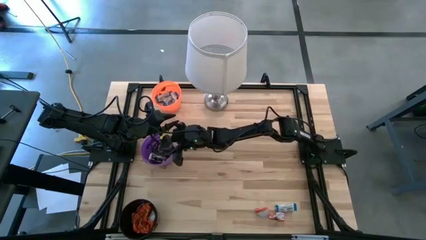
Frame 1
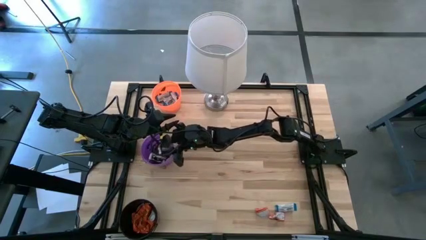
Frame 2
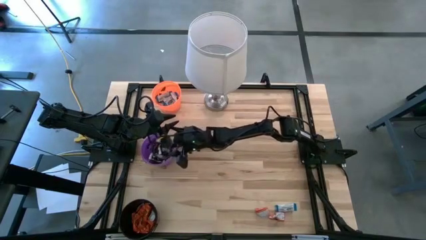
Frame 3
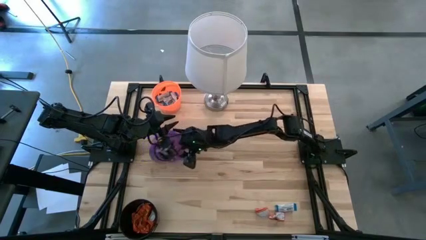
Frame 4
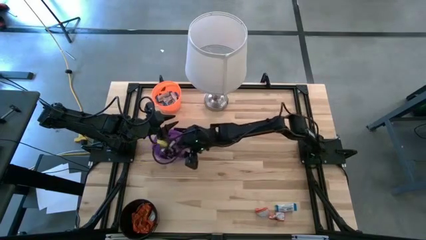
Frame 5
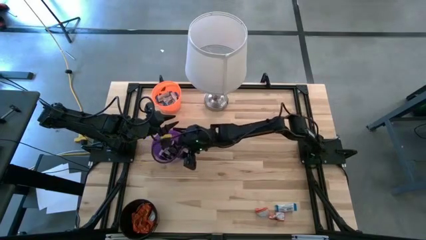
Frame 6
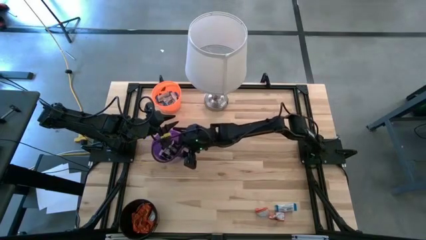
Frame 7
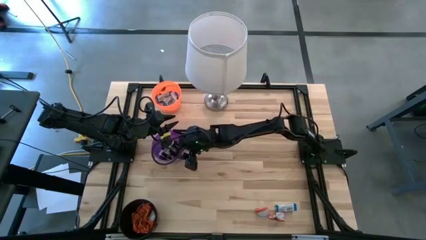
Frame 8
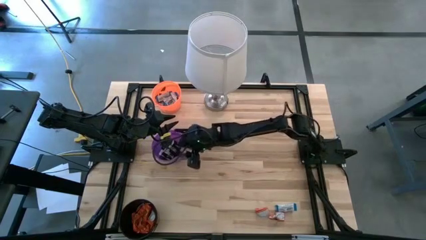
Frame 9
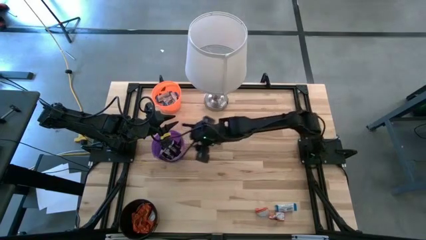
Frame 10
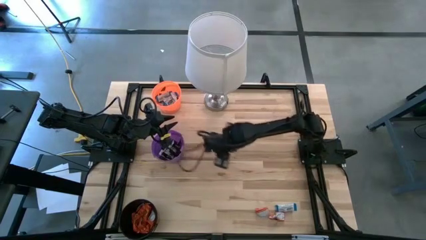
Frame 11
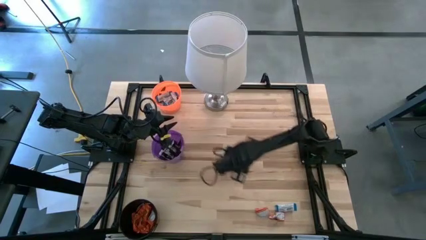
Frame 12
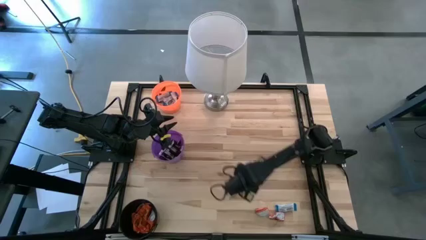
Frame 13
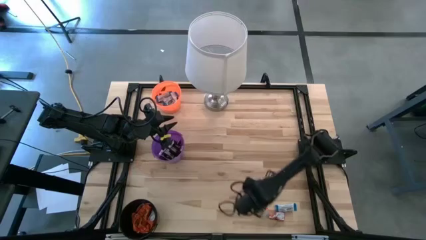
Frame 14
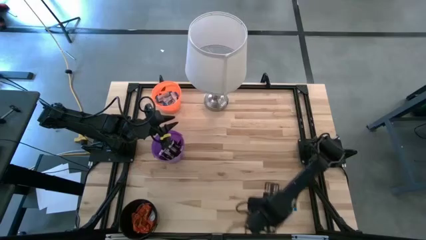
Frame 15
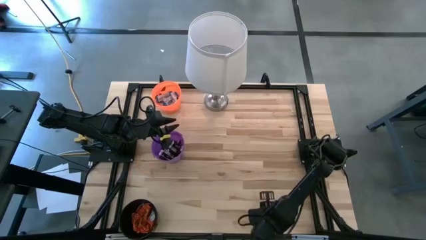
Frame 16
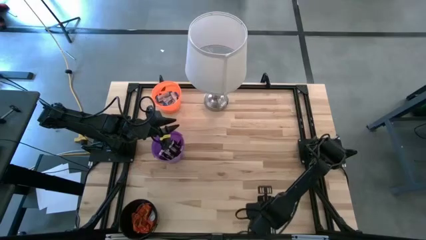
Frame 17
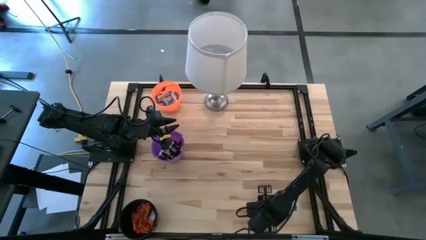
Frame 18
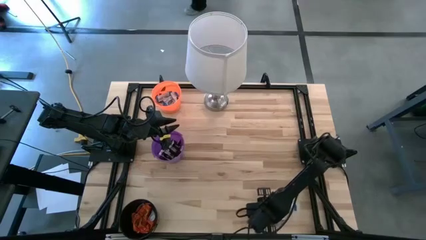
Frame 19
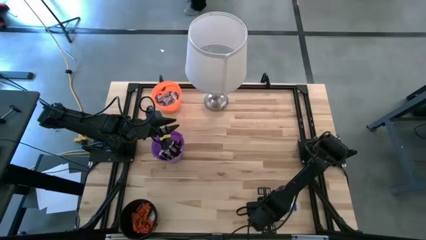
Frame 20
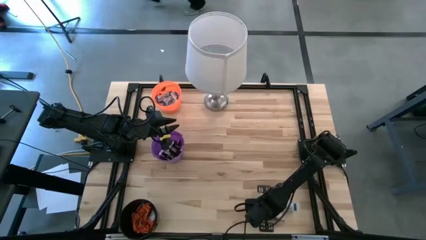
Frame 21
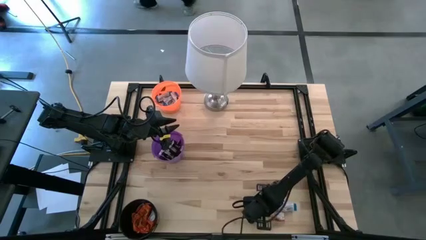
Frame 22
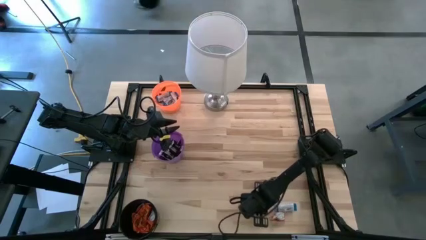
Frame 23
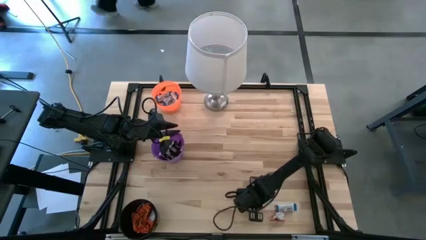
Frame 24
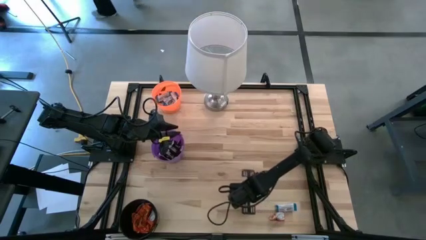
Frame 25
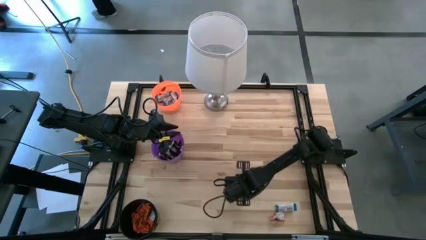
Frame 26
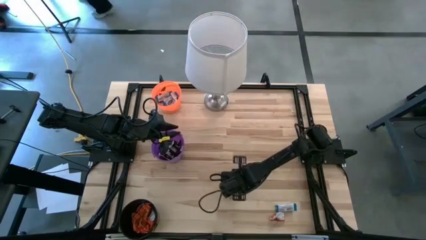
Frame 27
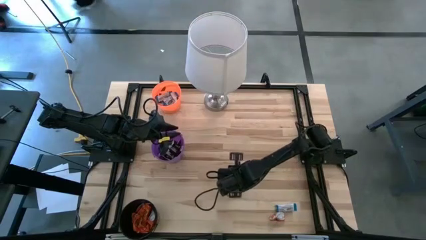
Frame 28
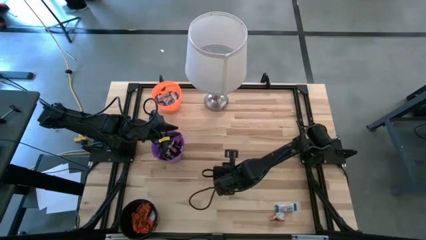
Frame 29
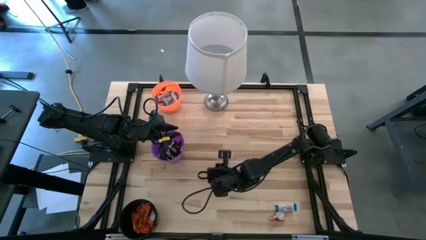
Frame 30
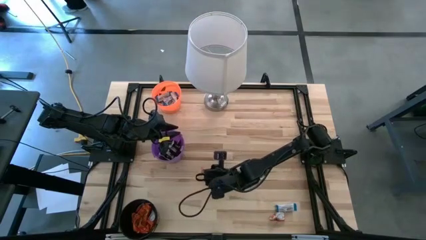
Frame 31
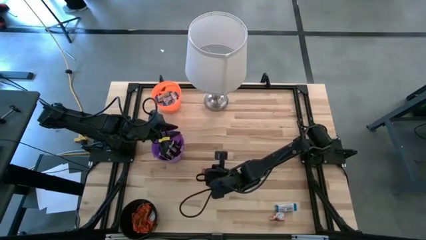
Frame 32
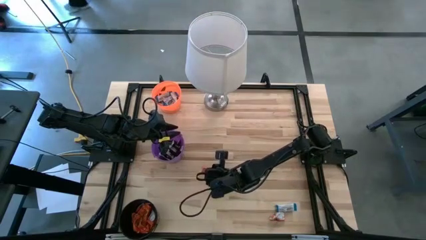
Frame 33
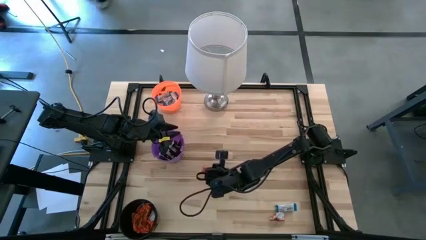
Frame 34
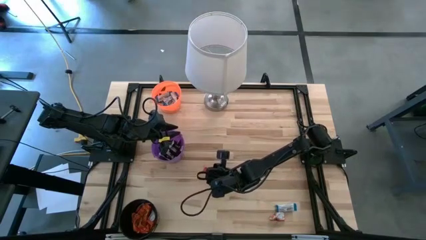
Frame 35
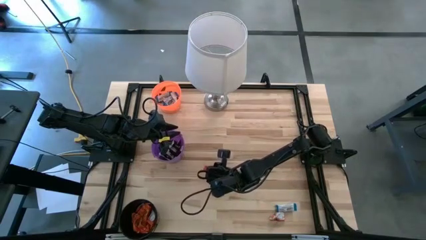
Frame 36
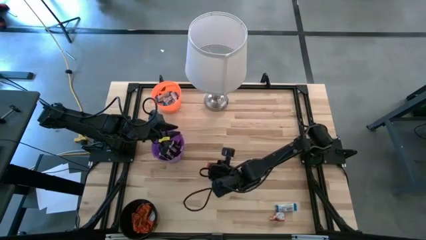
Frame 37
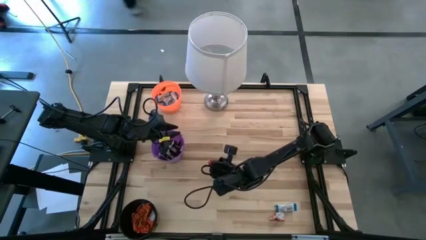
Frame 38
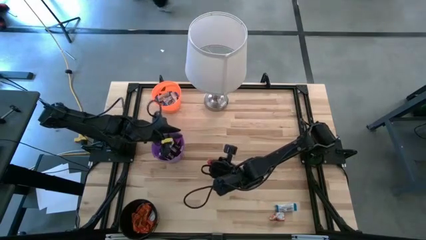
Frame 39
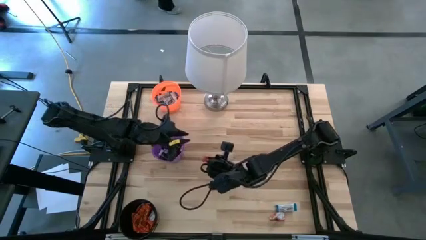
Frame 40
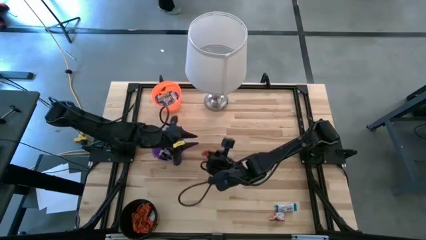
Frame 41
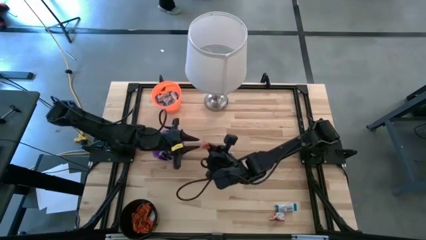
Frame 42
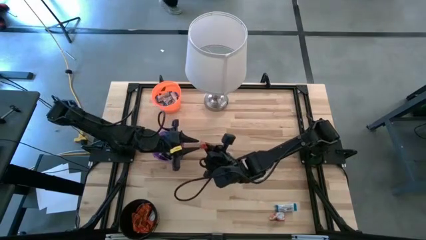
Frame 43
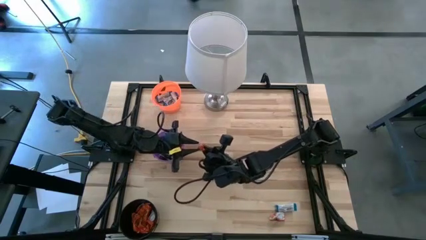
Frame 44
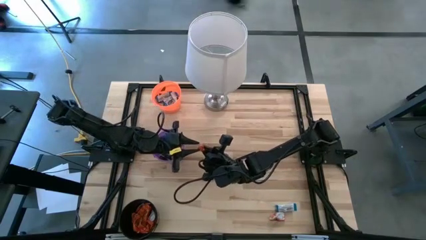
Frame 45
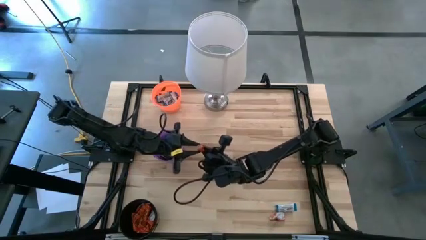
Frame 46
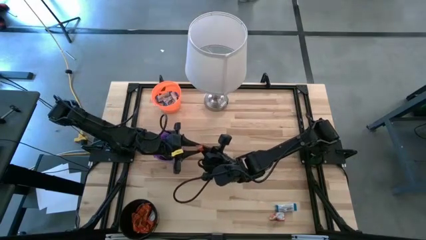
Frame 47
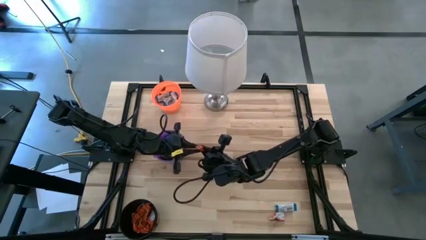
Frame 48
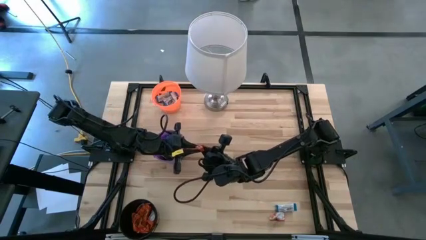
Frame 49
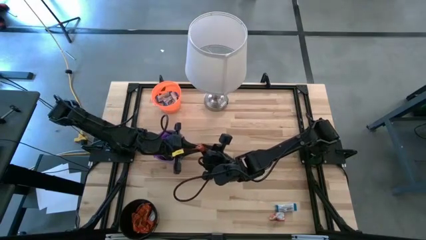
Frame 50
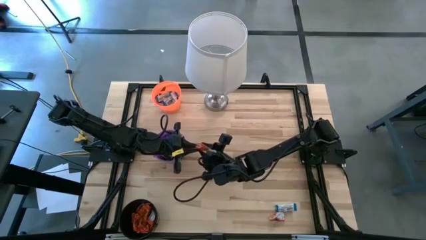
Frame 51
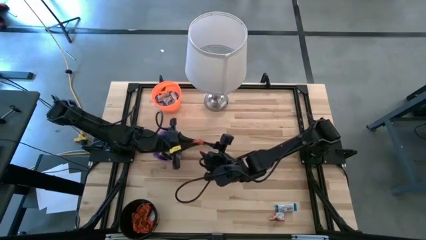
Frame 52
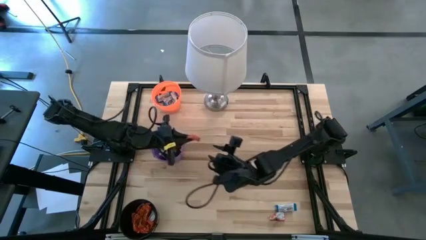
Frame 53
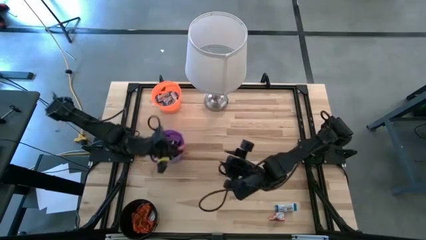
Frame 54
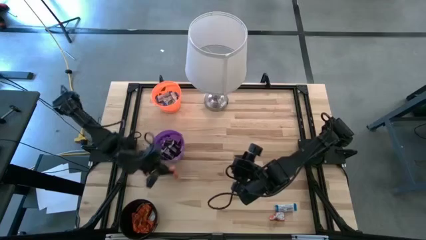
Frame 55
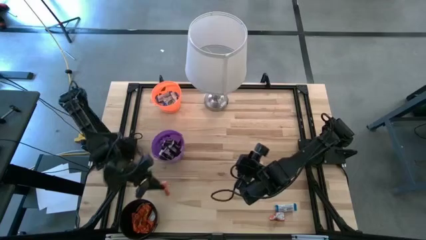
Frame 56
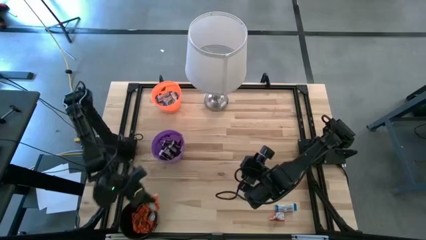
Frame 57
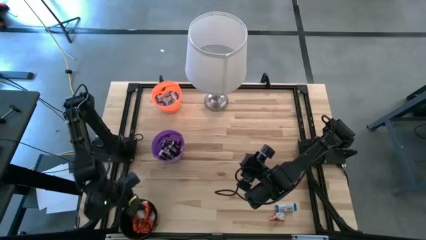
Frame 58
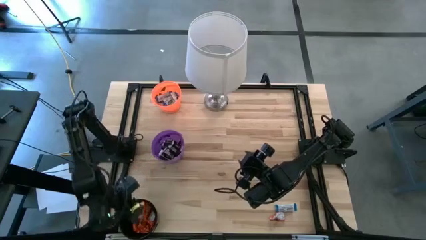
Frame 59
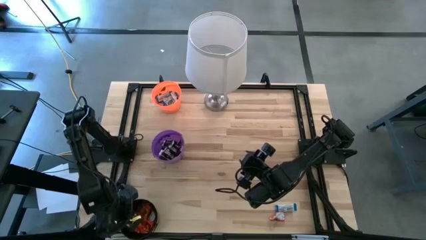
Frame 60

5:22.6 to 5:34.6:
Task: Sort candy
Put the orange chocolate into the black bucket

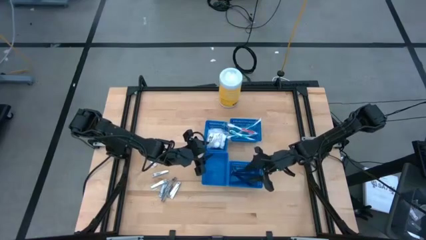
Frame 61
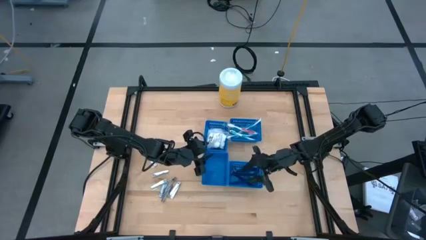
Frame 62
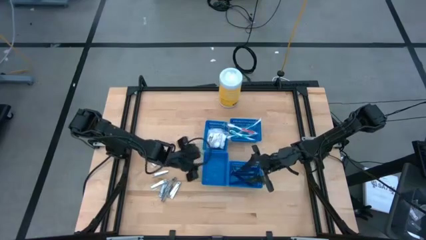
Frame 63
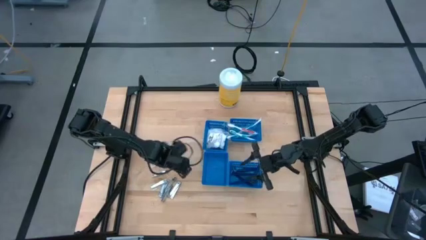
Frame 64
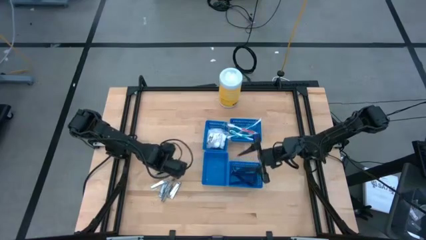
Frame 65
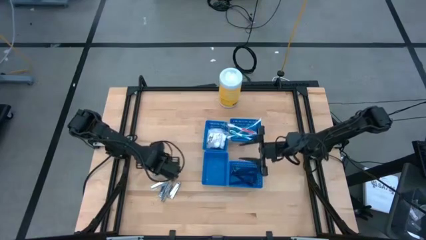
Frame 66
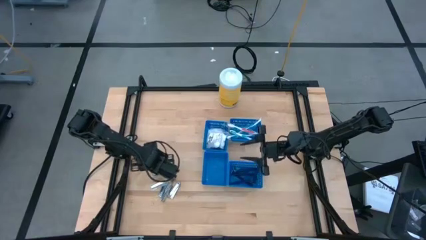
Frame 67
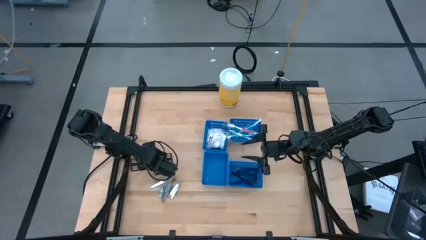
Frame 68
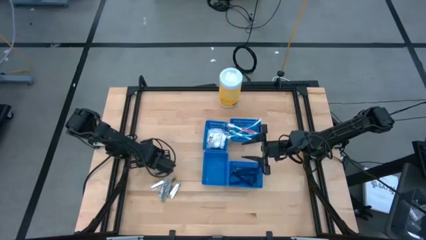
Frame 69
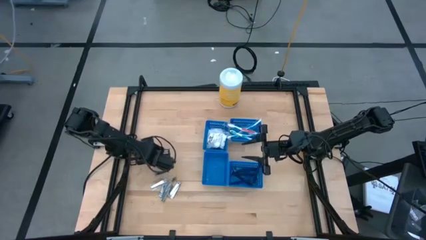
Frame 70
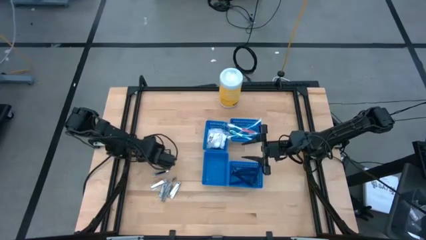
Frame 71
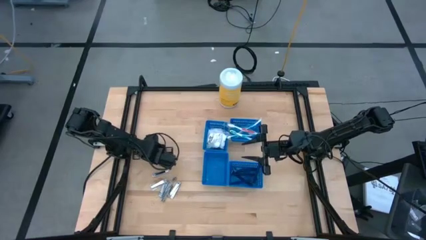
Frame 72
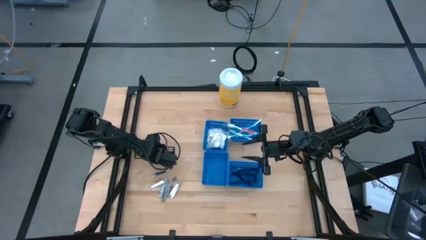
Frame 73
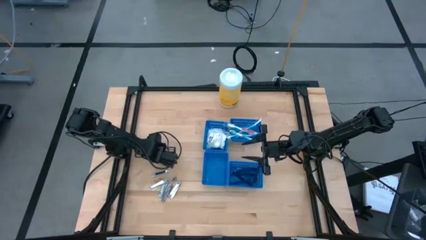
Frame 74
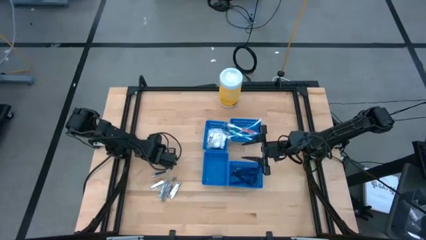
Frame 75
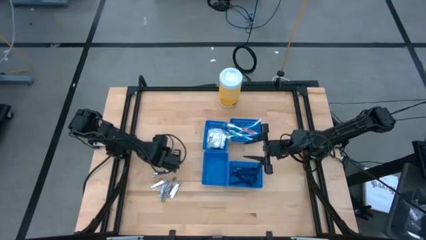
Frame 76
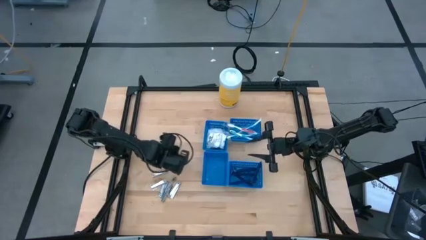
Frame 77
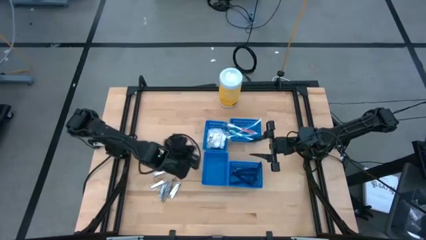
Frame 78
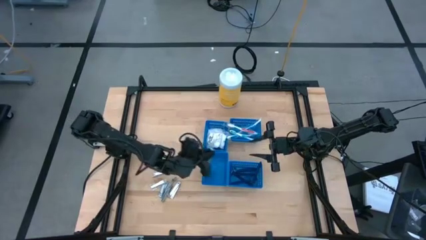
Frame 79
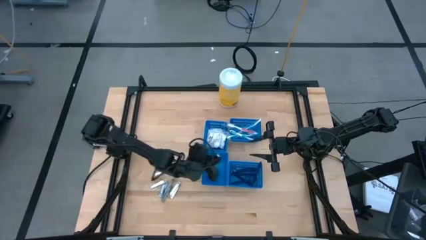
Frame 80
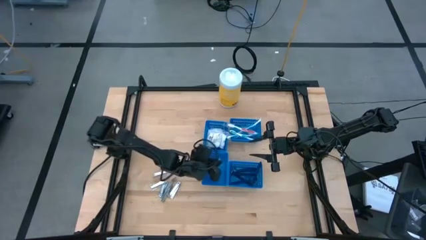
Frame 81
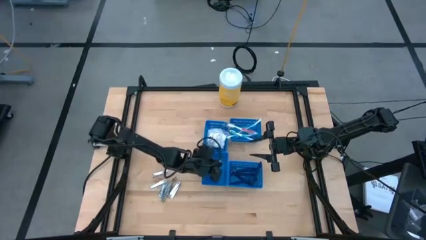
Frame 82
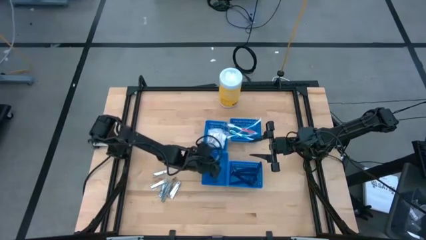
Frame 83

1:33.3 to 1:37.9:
Task: Pick & Place Travel size toiletries
Put the silver nail cutter into the bottom left blue bin
